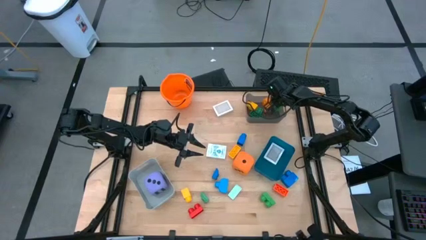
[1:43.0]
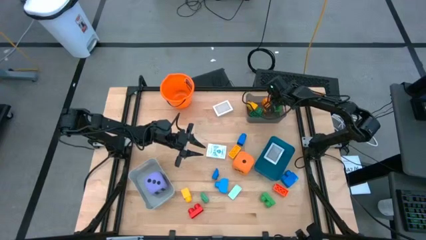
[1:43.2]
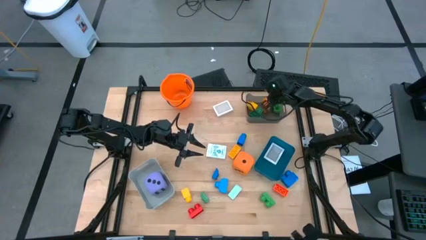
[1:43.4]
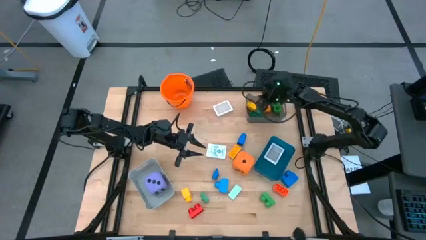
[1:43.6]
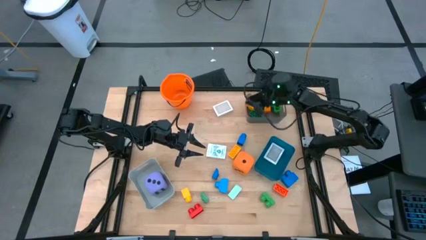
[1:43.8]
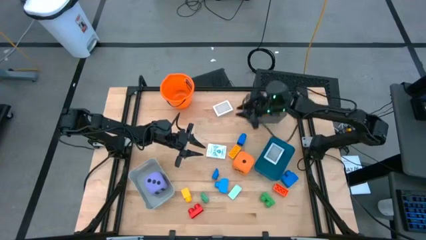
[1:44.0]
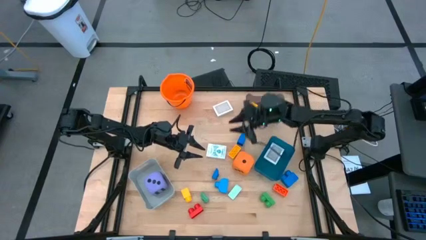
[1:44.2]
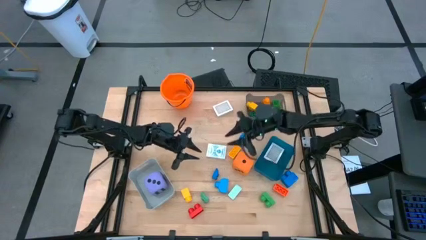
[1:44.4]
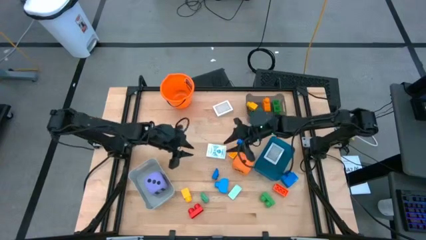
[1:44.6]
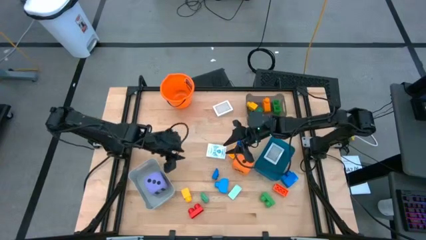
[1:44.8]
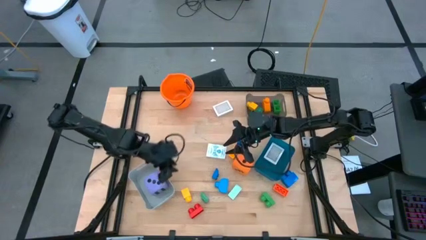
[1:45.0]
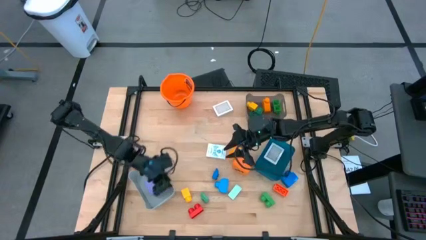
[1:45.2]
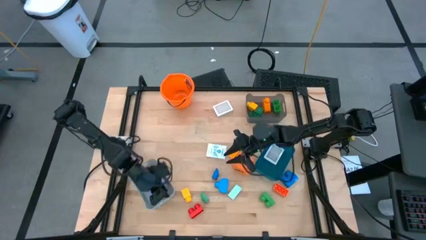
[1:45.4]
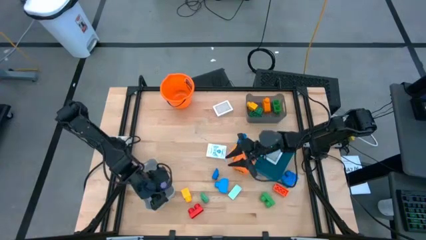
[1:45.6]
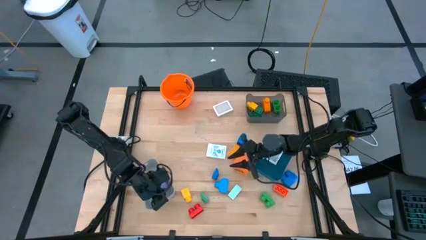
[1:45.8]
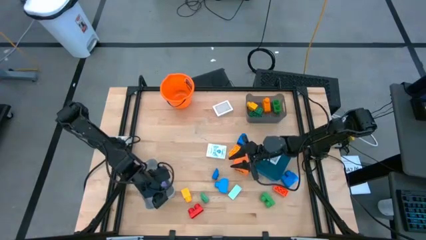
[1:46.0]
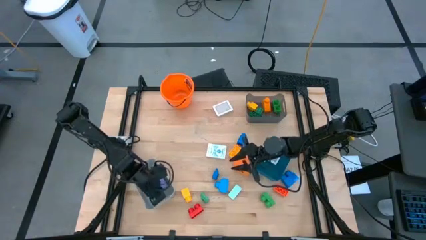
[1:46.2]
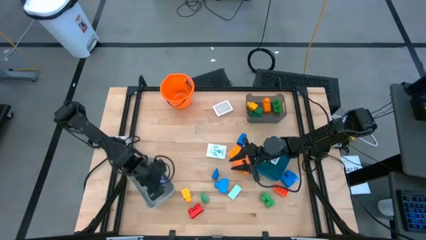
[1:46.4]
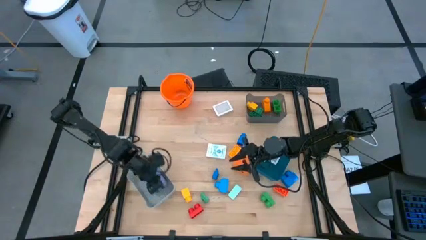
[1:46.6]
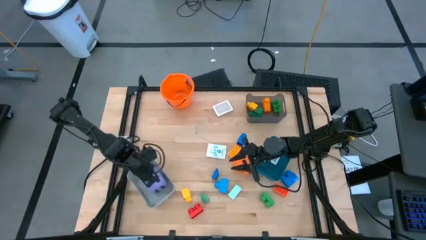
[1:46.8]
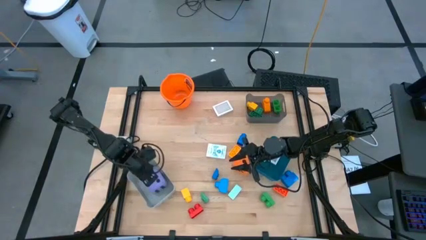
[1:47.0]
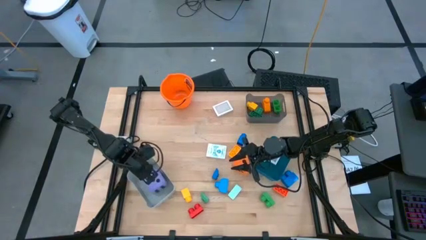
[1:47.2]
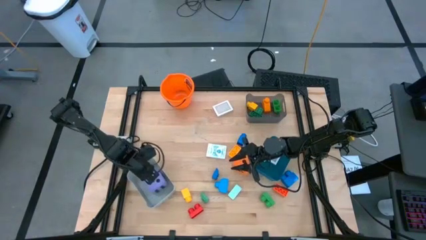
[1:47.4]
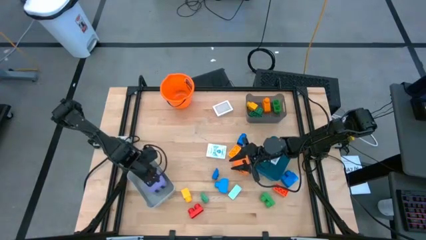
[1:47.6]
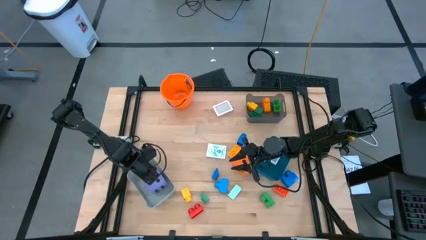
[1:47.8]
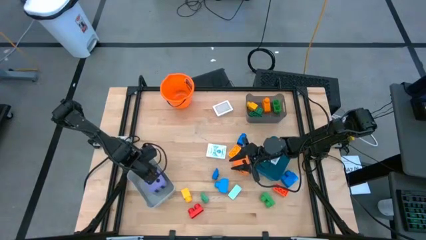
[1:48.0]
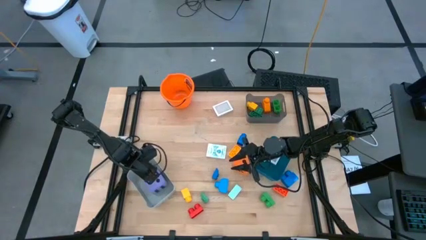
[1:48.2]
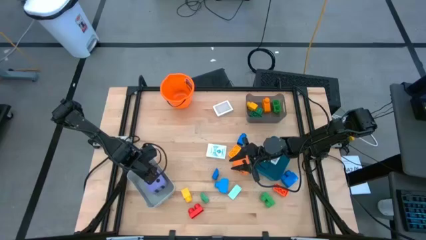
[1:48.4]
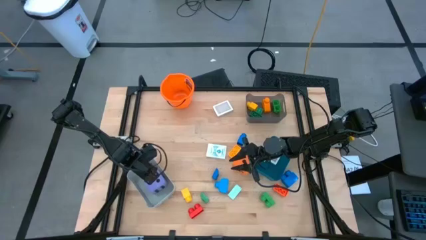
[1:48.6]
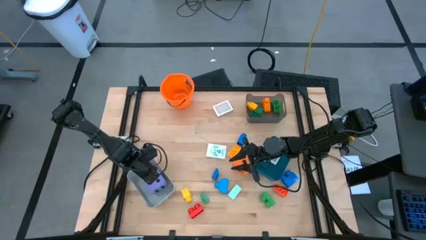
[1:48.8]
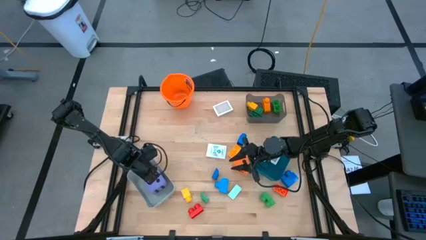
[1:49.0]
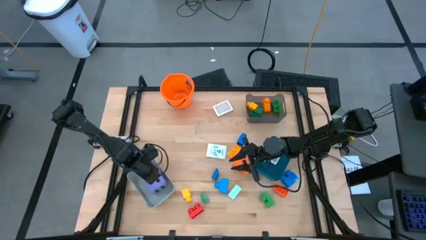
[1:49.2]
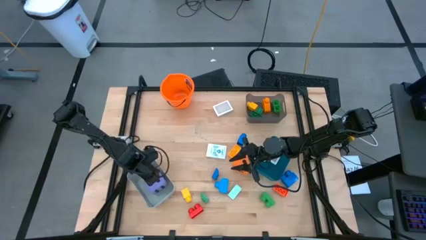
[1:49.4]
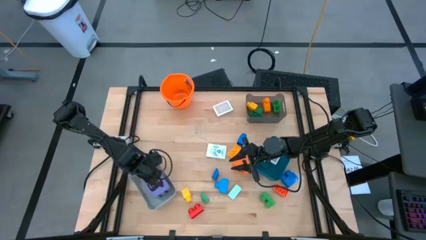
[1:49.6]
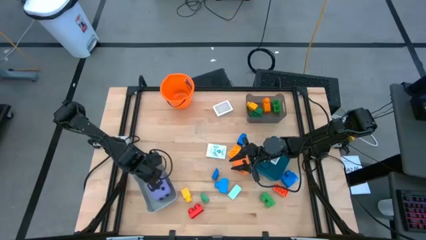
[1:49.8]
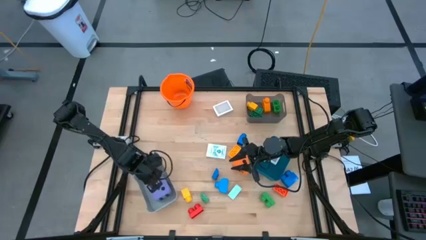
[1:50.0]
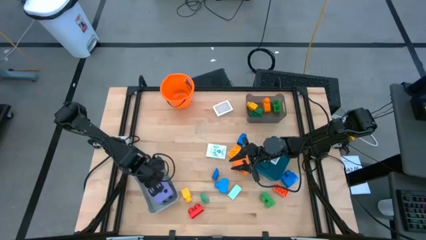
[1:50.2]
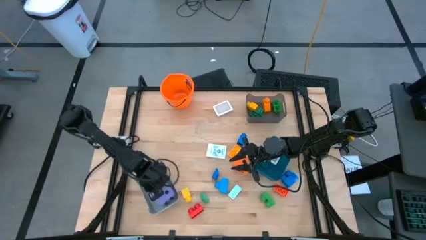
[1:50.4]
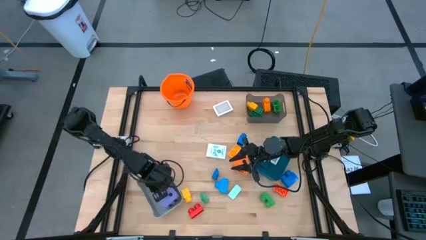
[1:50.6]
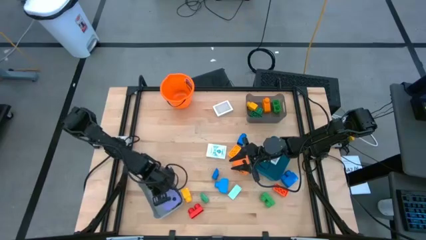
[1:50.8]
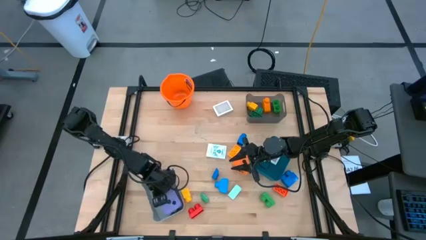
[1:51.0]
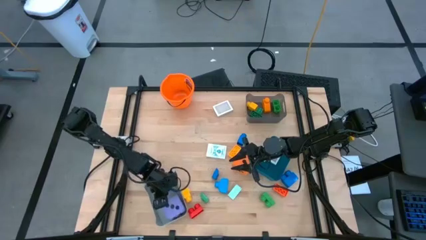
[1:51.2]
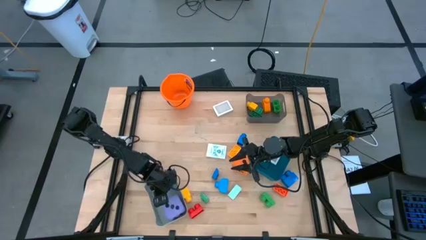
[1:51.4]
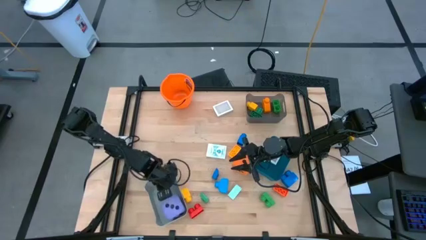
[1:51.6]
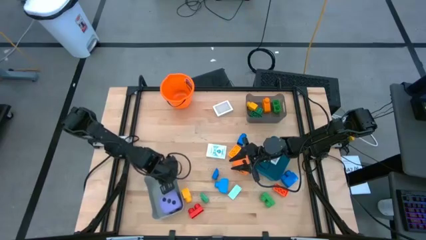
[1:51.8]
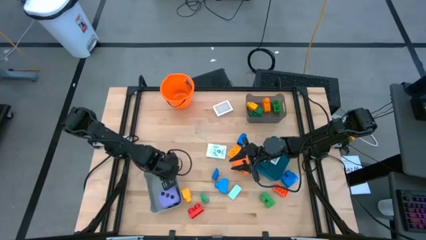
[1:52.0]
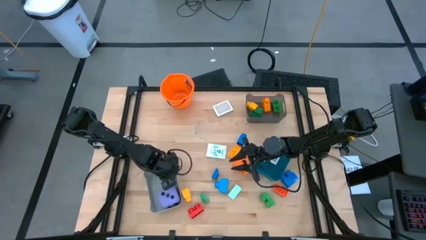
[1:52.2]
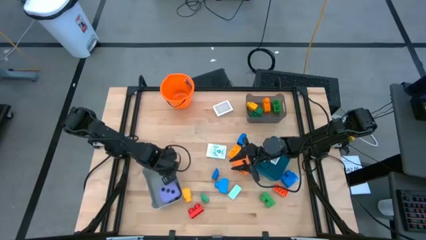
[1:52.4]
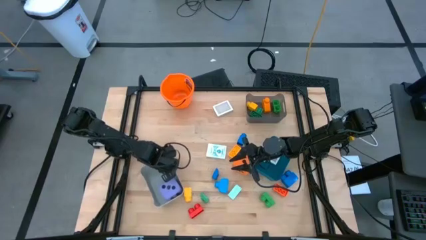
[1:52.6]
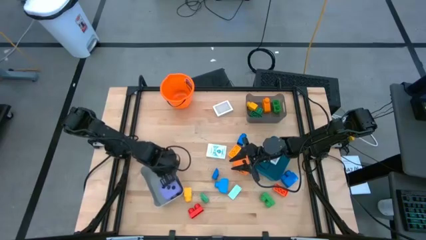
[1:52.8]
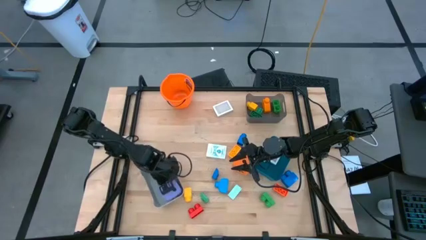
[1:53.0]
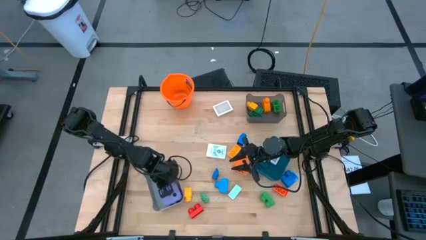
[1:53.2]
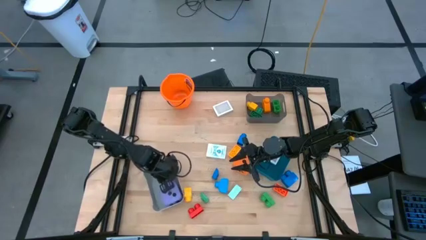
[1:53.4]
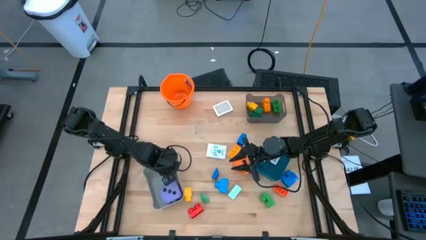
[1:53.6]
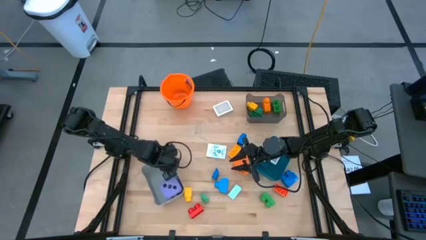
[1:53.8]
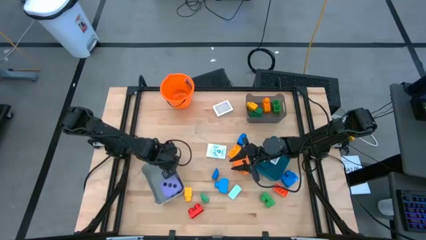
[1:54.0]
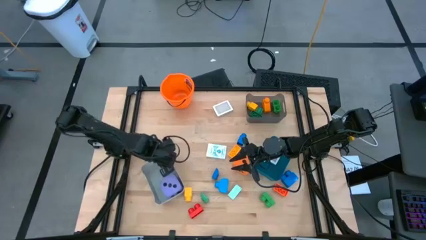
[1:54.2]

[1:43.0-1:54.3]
Task: Pick & Place Toys
Adjust the purple dice in the gray bin
